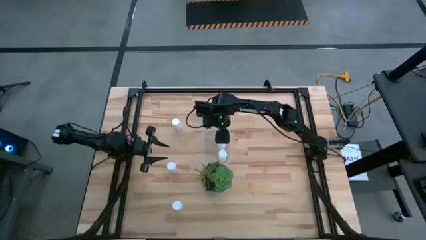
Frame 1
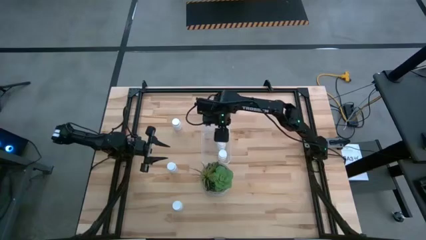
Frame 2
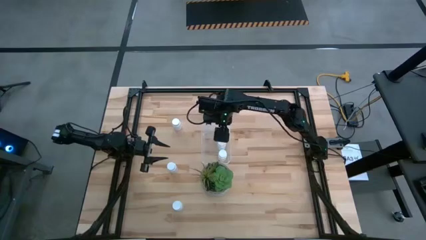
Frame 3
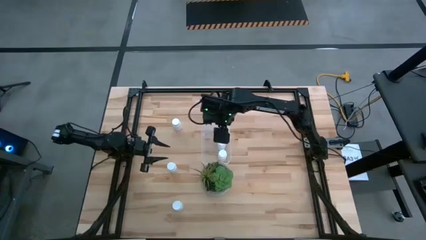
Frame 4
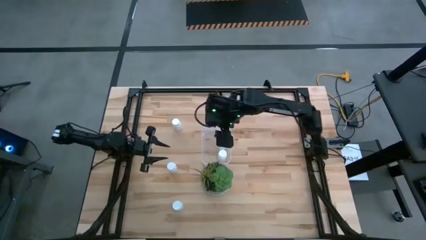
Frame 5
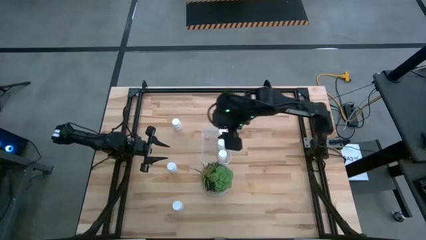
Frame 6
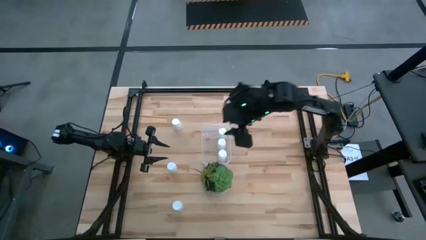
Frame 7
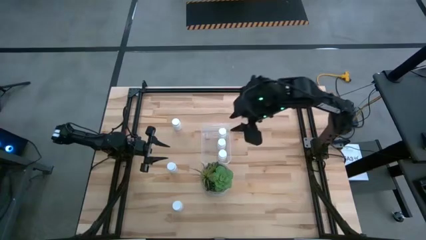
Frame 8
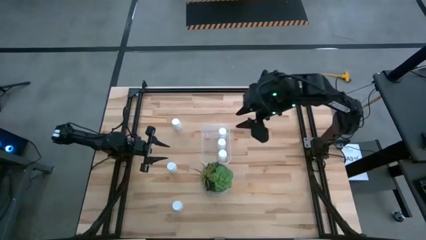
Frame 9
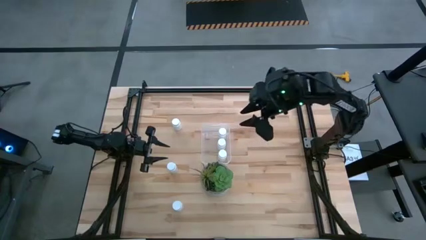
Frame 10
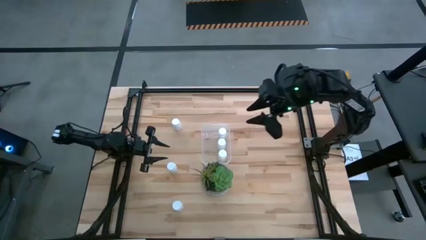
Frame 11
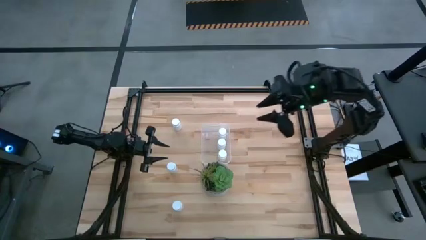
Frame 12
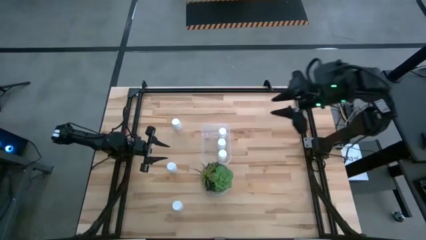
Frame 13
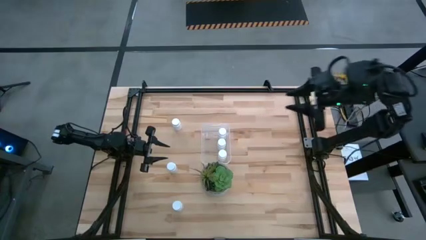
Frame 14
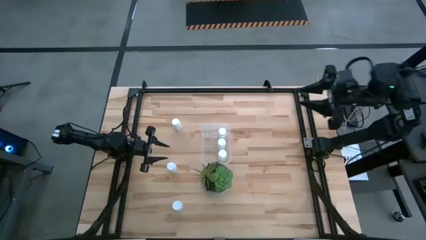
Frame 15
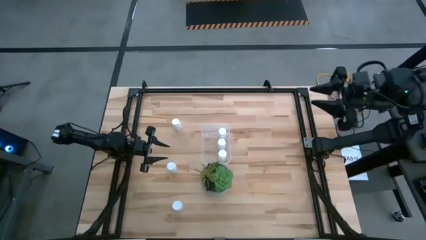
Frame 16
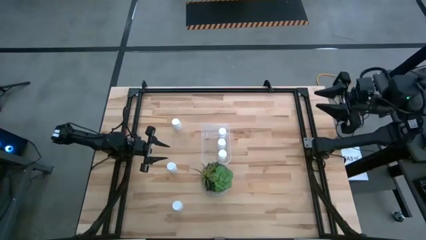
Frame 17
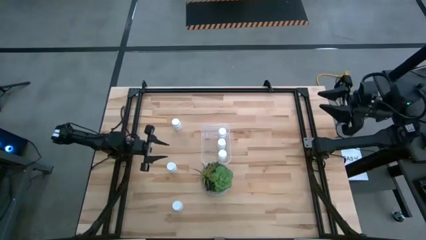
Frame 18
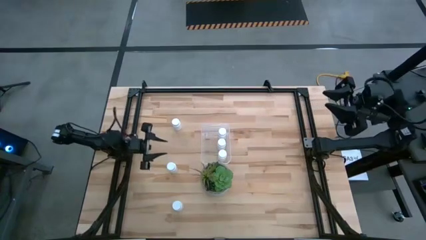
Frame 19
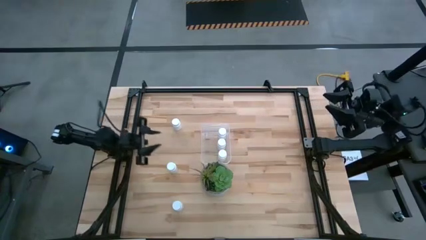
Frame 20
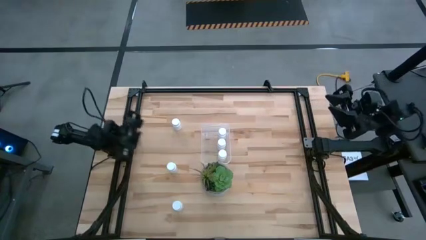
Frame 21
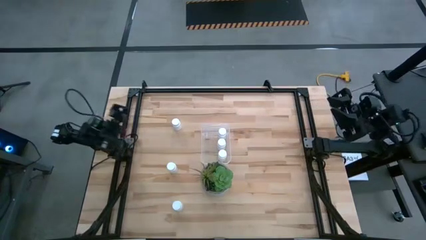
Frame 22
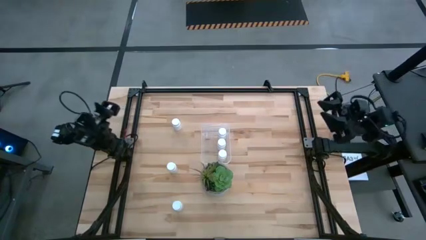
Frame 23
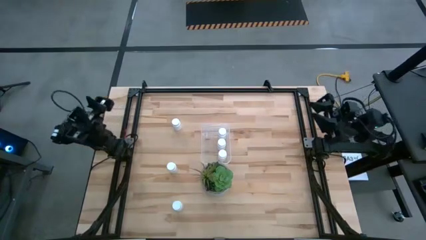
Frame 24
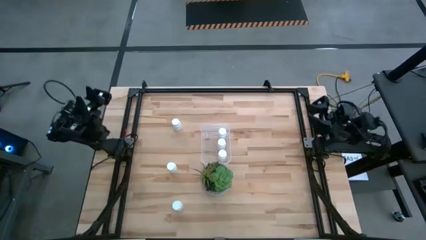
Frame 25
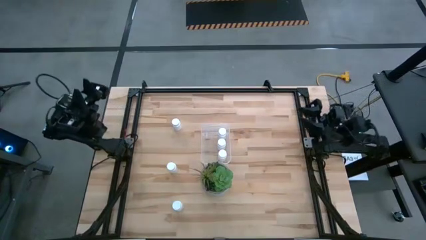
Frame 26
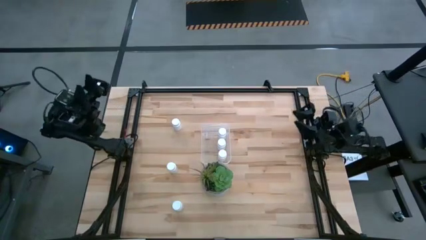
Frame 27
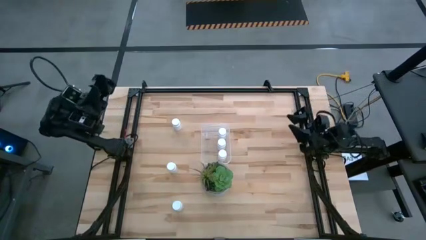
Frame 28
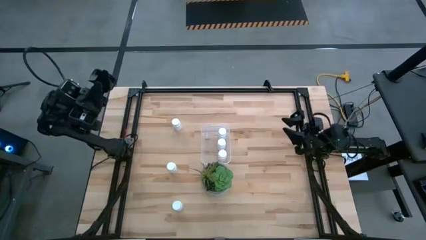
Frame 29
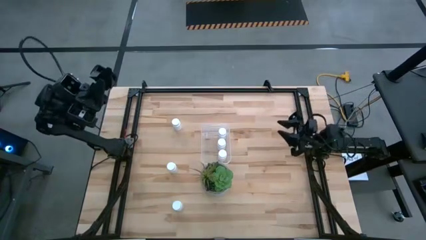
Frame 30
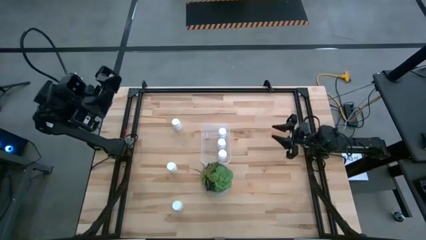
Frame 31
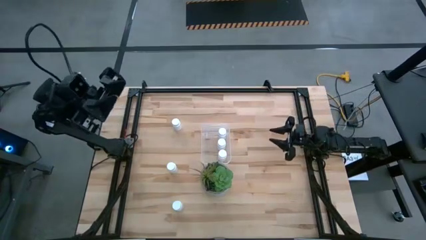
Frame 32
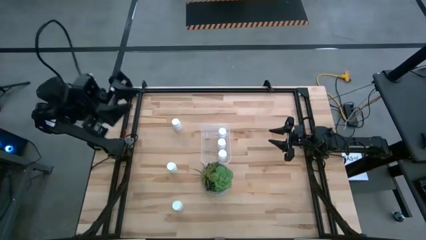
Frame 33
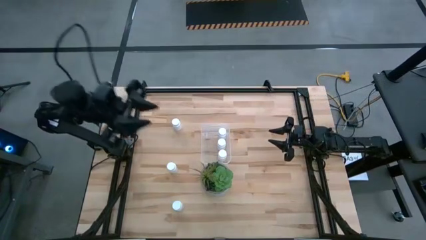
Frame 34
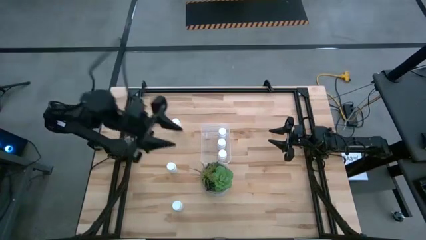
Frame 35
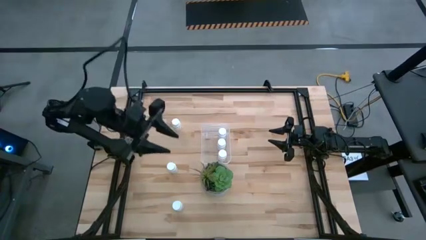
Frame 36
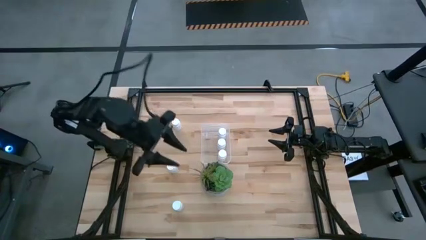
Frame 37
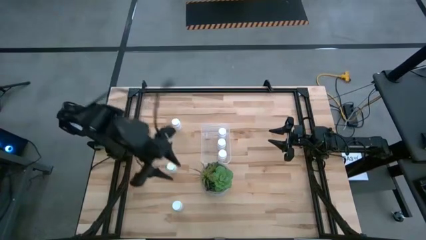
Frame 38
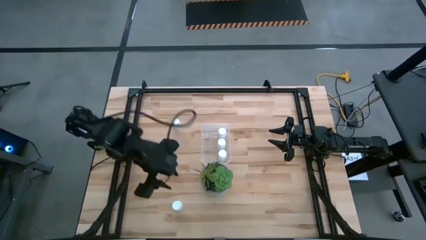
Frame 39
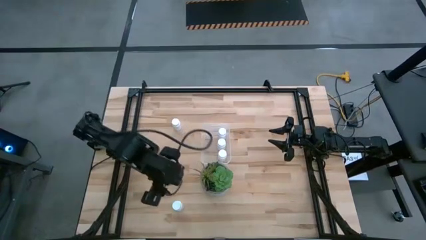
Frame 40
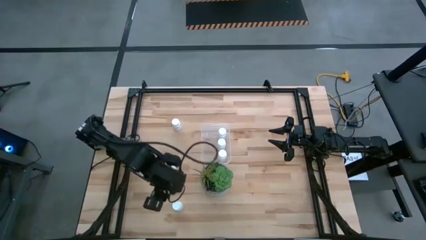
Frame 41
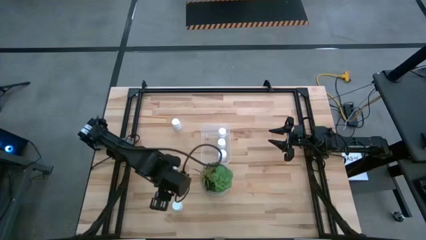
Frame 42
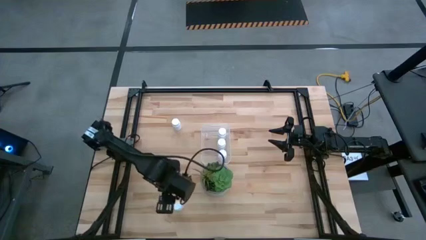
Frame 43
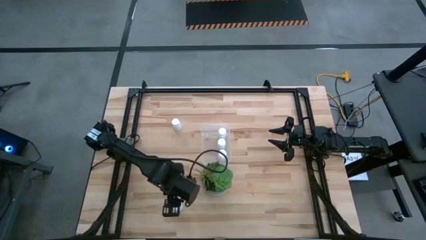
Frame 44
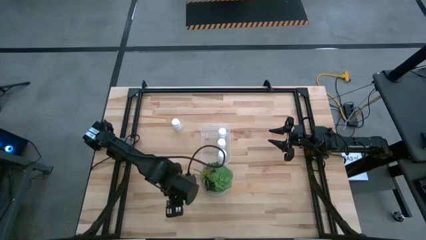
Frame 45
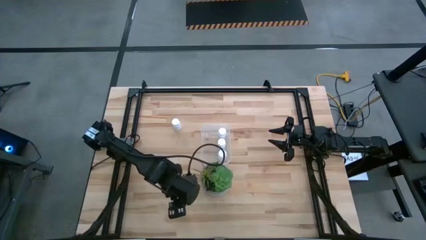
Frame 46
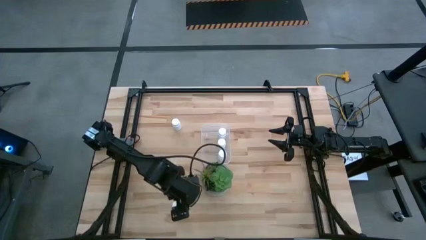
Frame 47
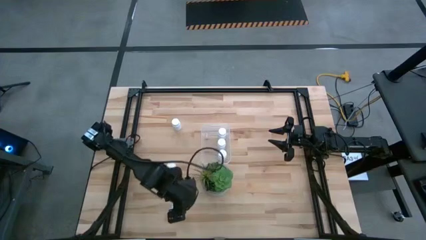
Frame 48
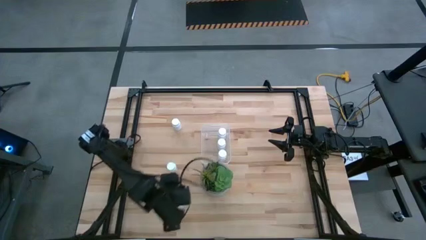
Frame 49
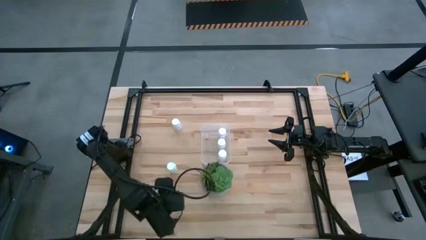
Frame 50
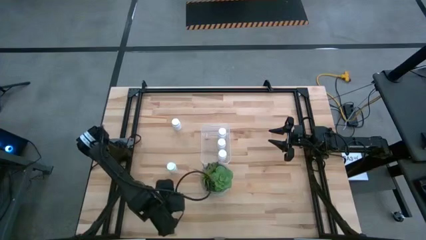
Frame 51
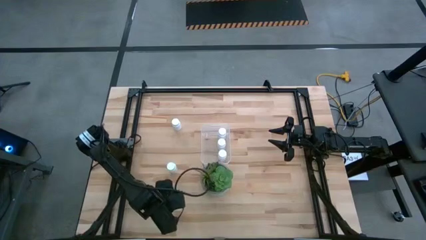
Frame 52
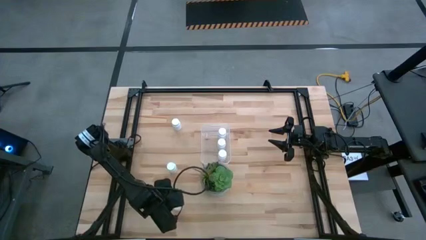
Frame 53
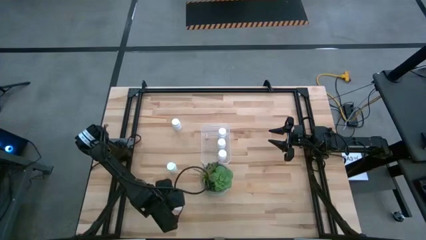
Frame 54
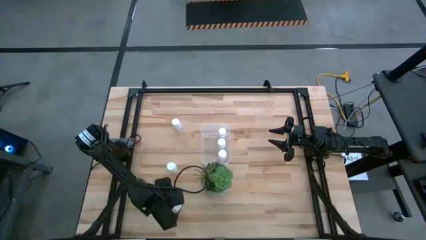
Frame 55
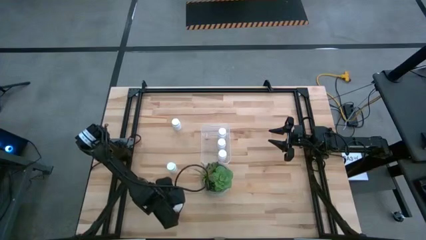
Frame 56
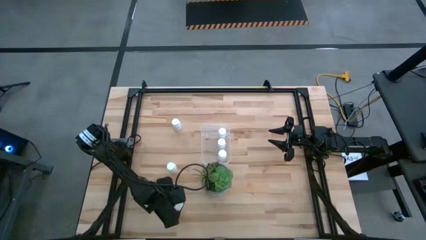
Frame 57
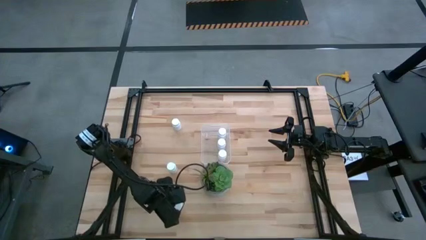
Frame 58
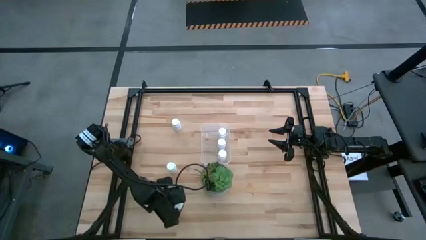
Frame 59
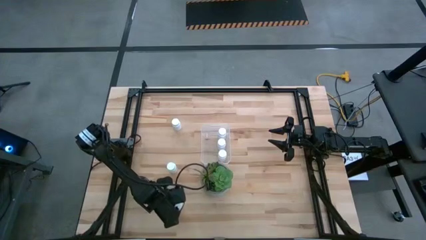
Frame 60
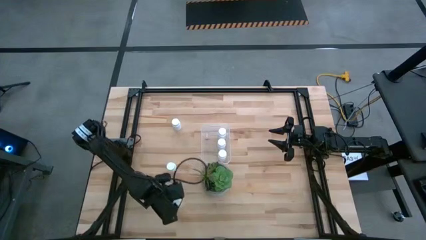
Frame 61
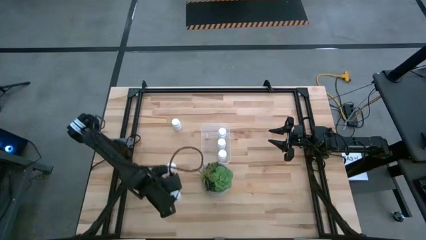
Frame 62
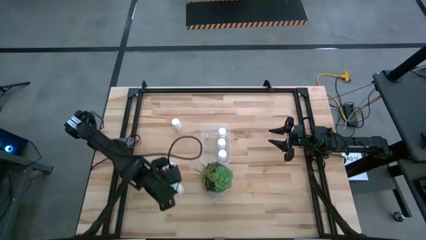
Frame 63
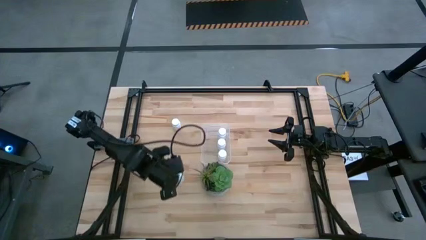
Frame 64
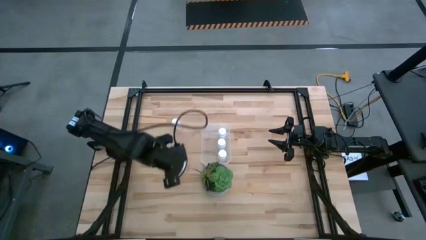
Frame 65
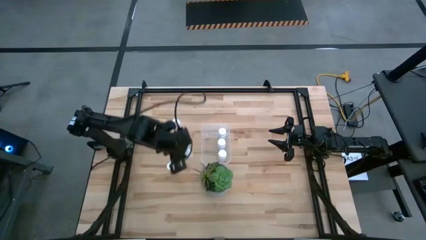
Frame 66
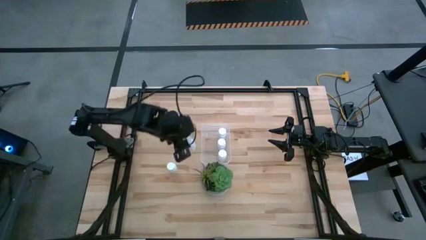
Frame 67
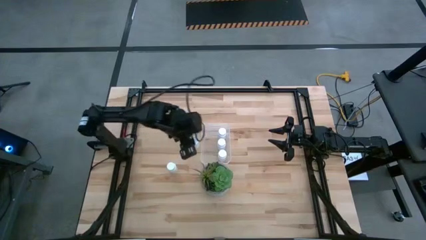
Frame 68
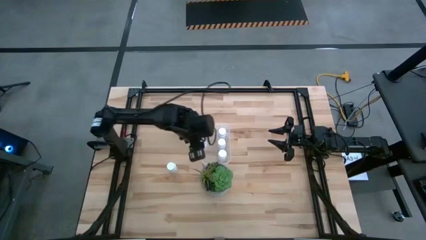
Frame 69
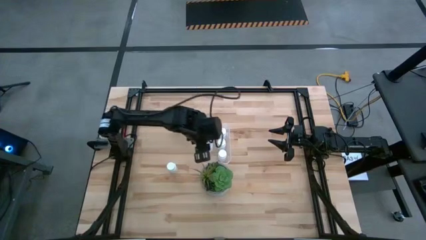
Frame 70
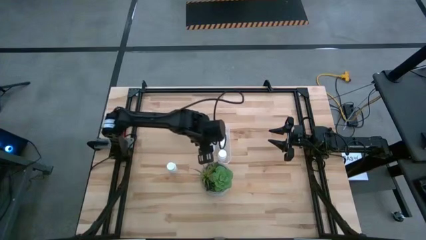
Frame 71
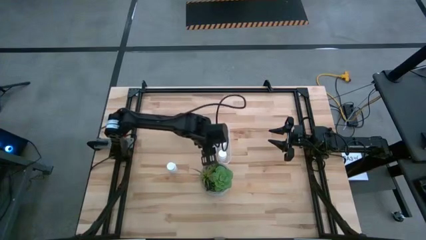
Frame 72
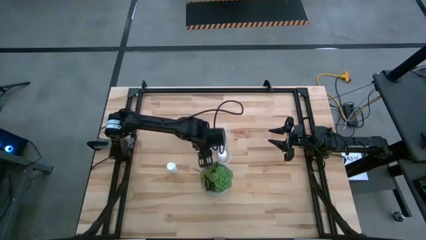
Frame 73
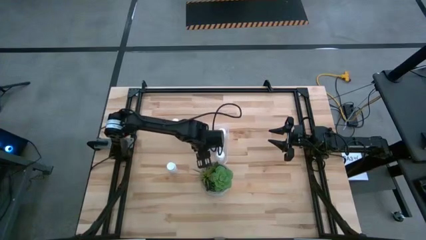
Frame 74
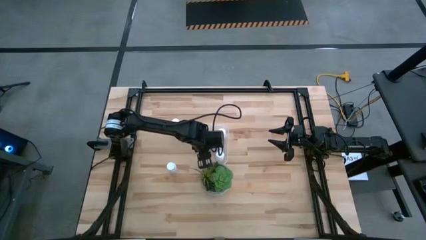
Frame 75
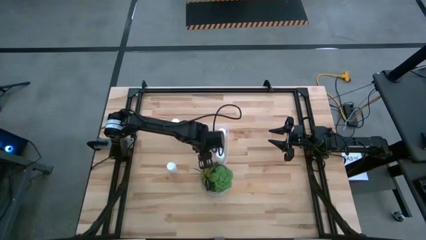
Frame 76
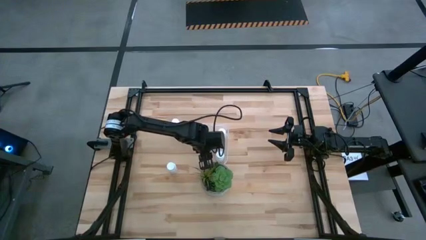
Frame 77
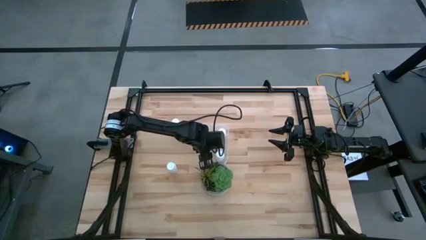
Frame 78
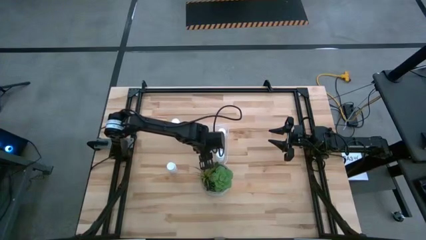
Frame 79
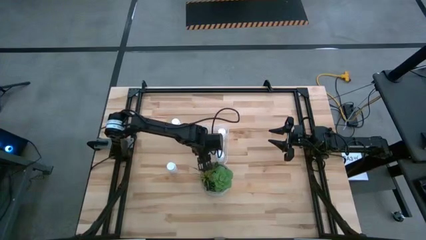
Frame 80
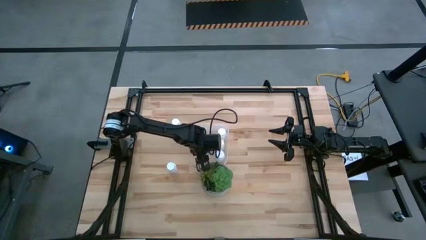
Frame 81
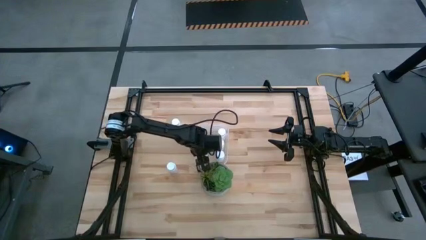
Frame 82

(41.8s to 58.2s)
Task: Pick and place pill bottles into a basket
Put the white pill bottle into the transparent bin

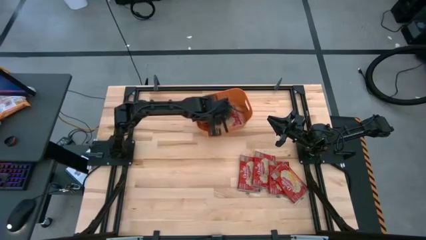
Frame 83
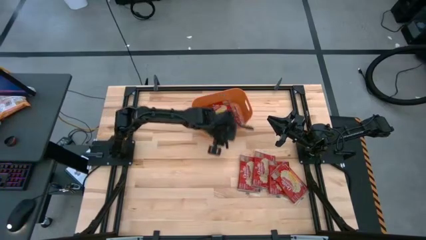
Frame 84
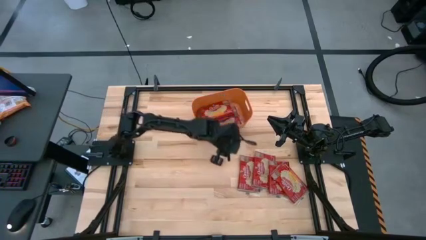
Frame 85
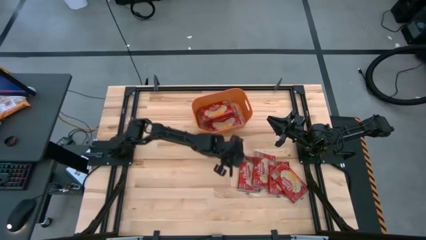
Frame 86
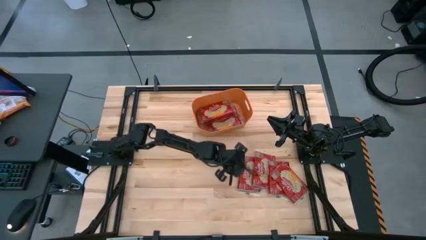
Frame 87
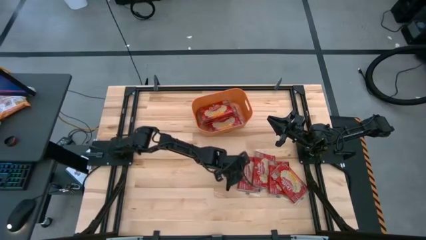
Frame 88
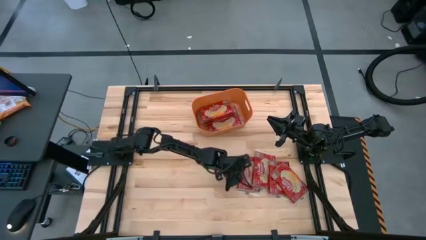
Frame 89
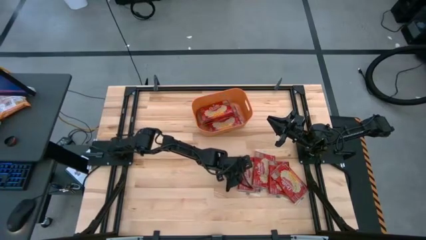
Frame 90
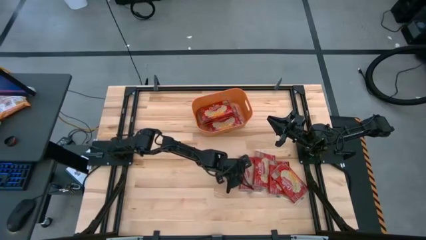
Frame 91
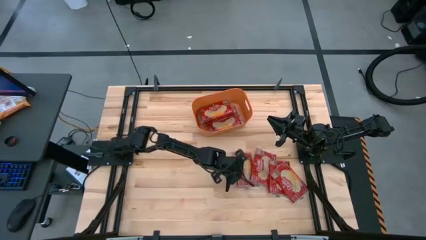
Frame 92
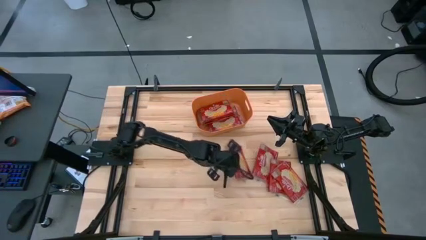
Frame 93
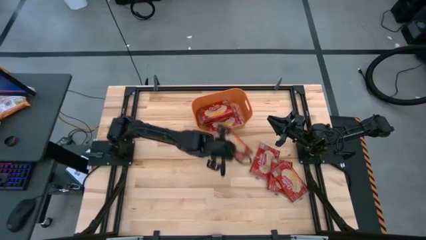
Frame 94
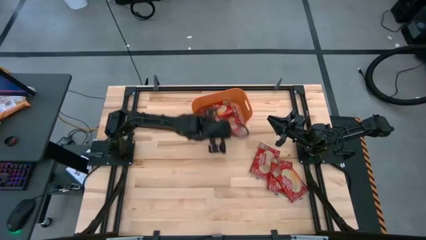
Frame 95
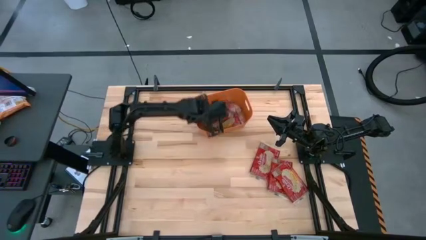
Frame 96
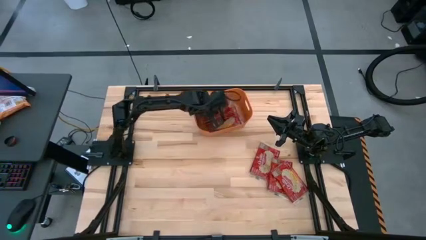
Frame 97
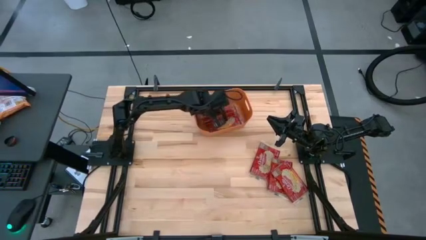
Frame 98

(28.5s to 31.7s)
Task: Sort popcorn bags into baskets
Put the red popcorn bag into the orange bin
